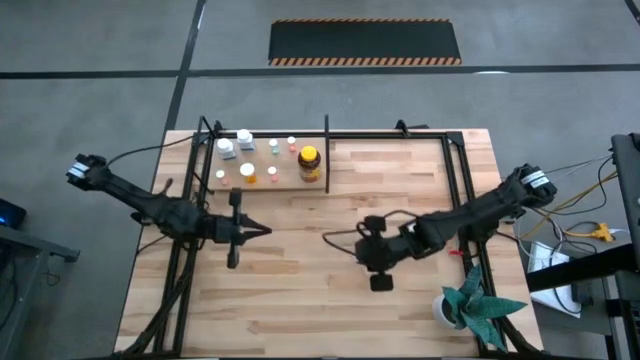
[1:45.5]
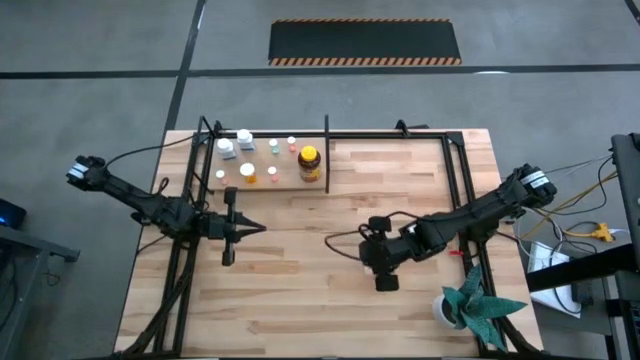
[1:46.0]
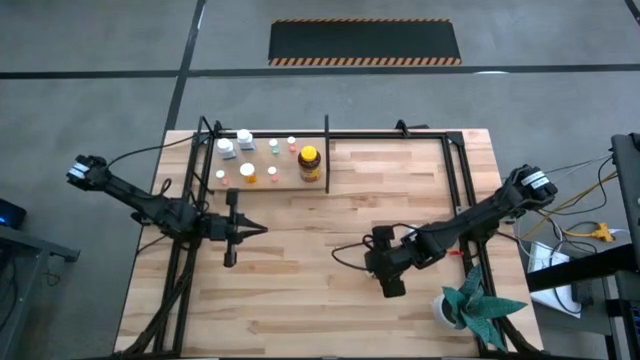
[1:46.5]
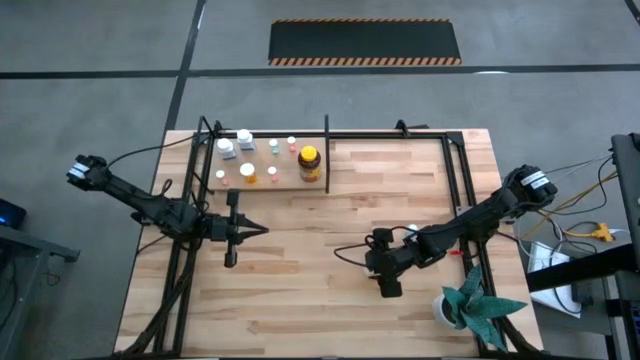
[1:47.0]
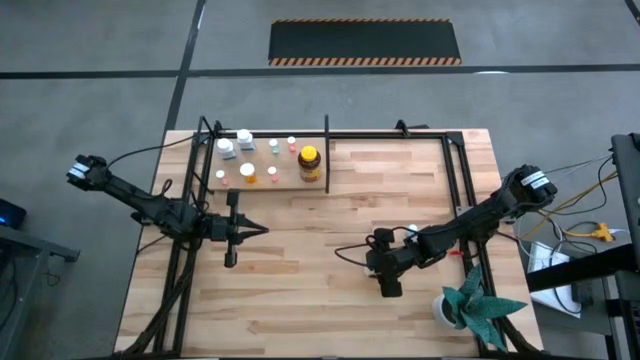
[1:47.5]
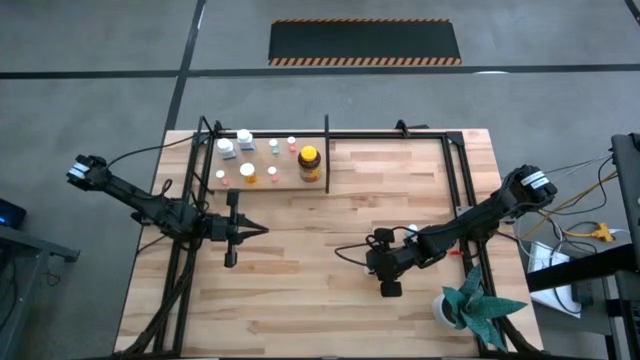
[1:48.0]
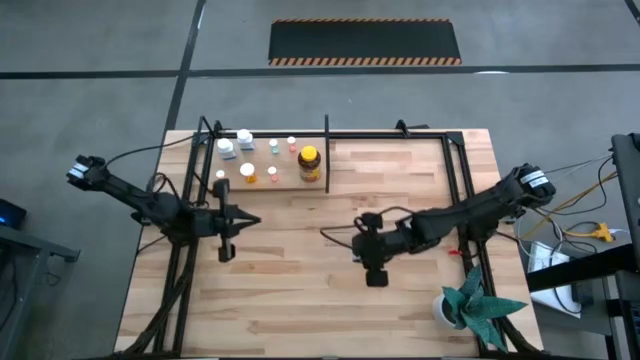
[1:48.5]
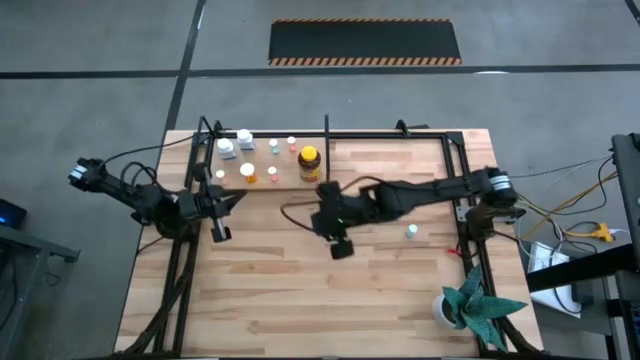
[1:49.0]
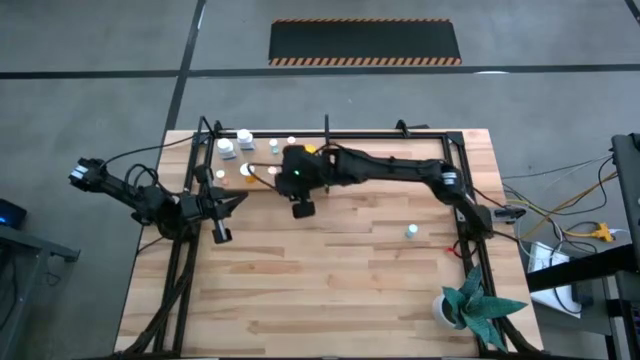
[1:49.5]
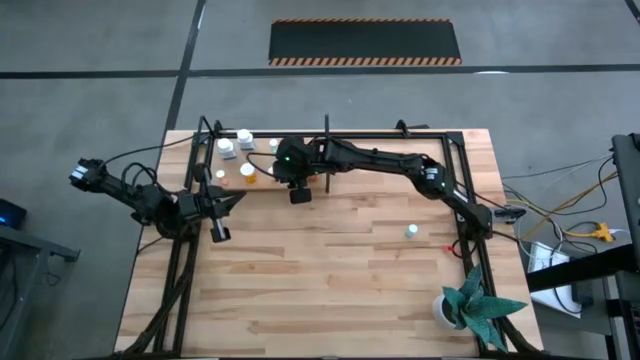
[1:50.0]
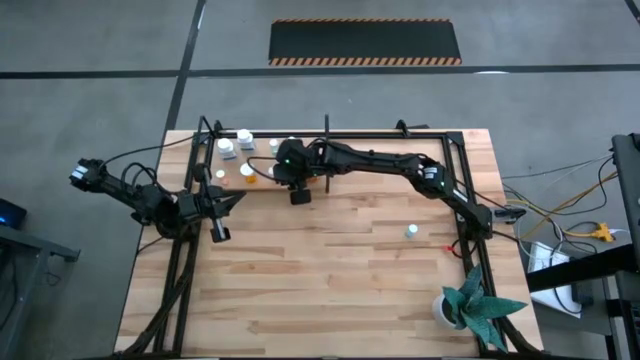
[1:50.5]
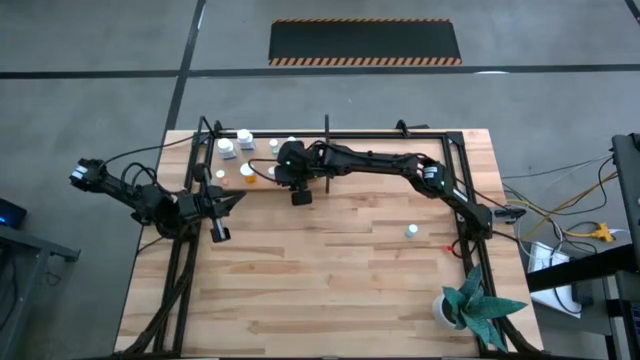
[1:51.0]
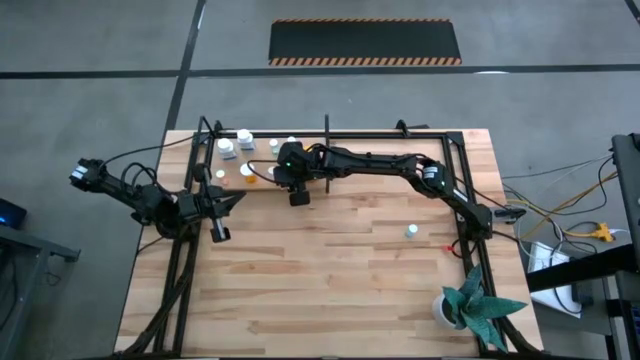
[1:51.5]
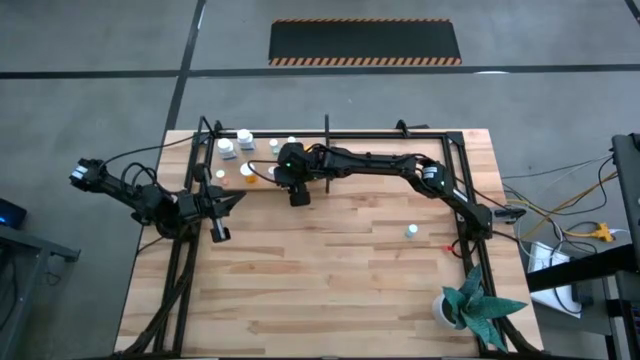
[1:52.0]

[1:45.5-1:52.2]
Task: Pick and place medicine bottles onto shelf by color
Put the transparent pill bottle on the shelf

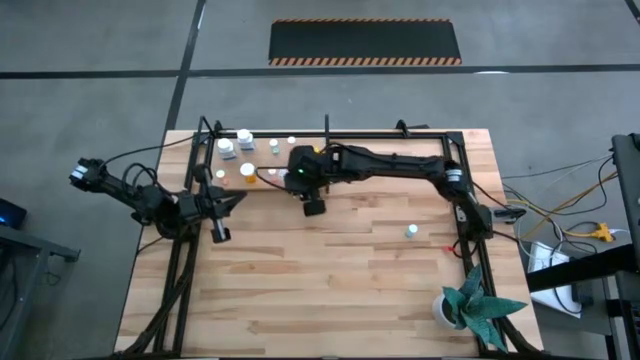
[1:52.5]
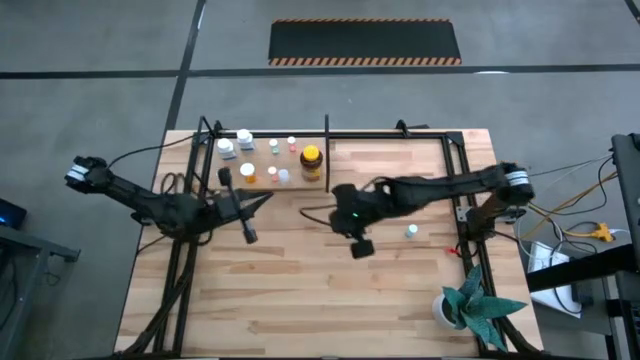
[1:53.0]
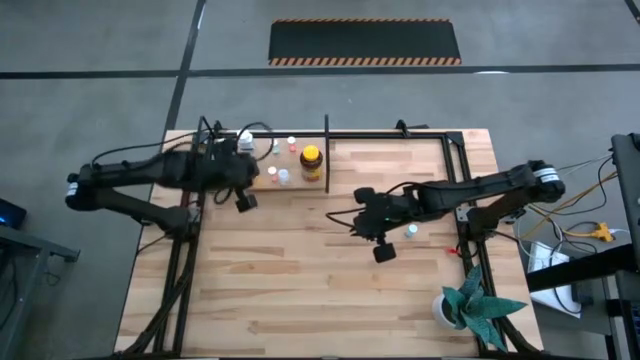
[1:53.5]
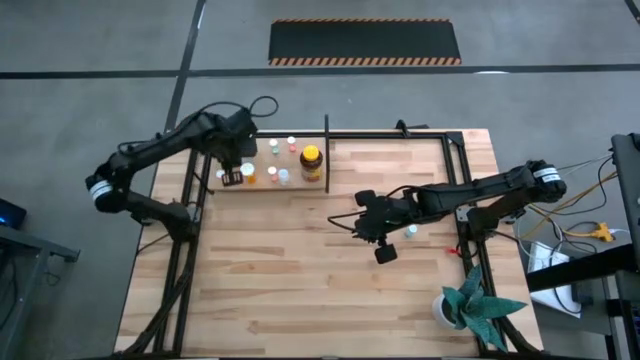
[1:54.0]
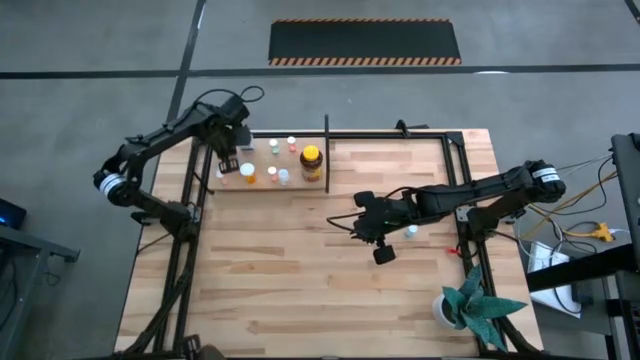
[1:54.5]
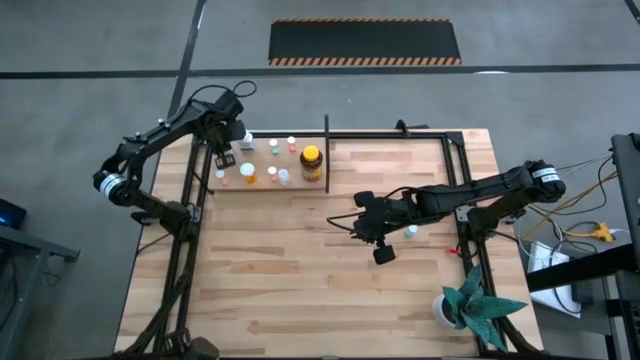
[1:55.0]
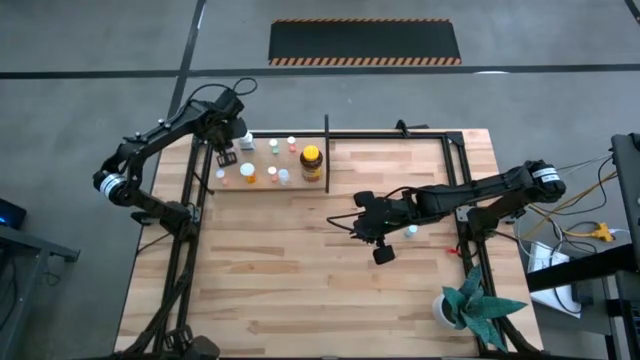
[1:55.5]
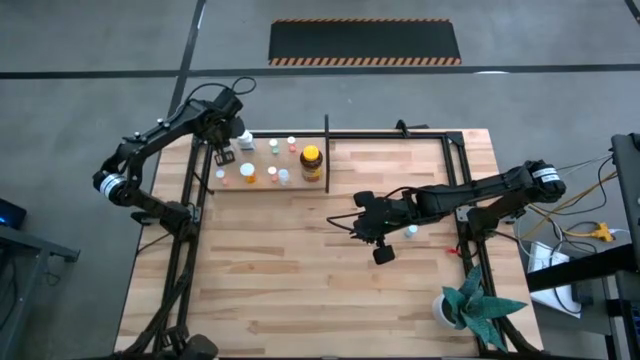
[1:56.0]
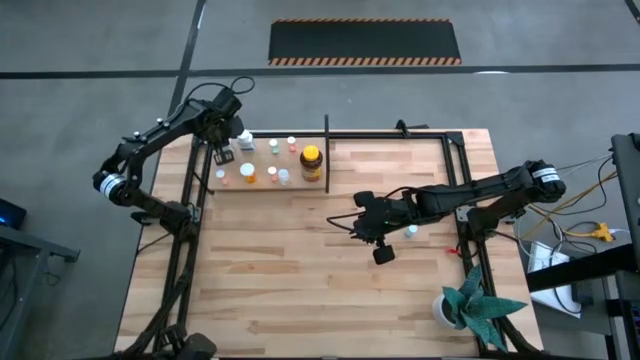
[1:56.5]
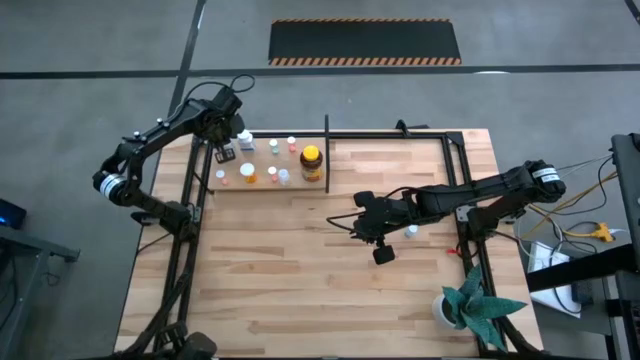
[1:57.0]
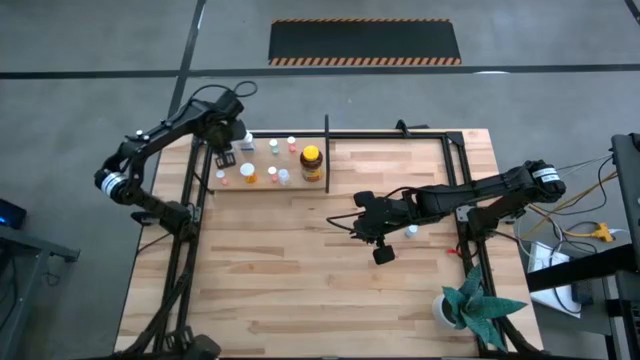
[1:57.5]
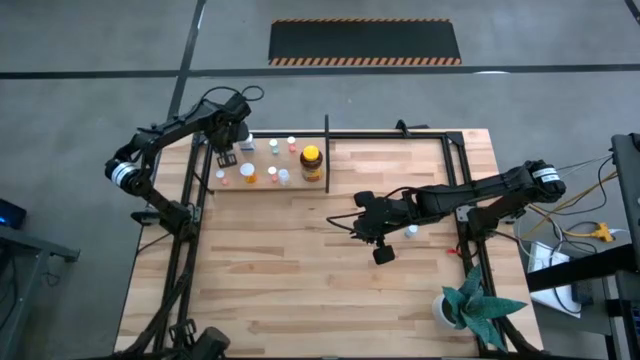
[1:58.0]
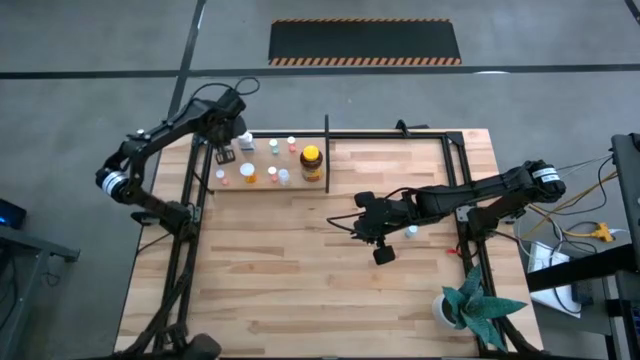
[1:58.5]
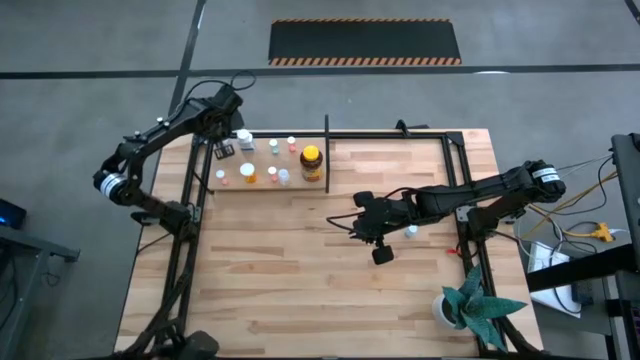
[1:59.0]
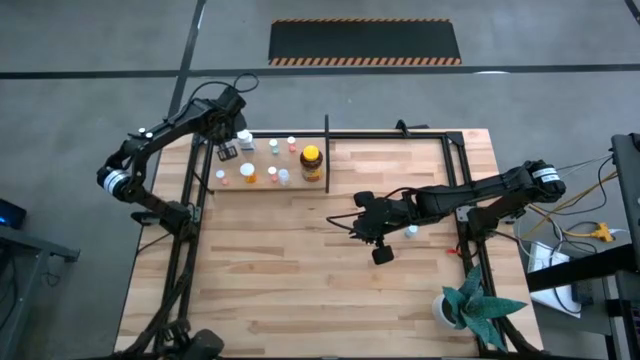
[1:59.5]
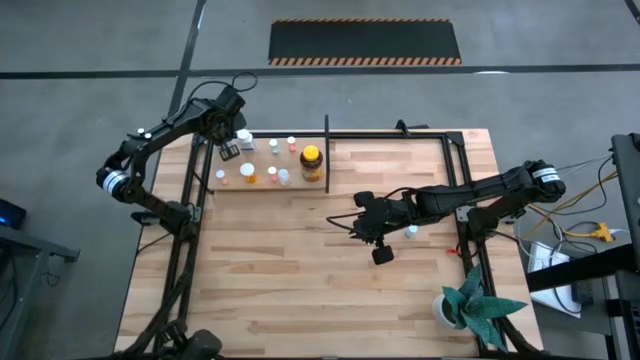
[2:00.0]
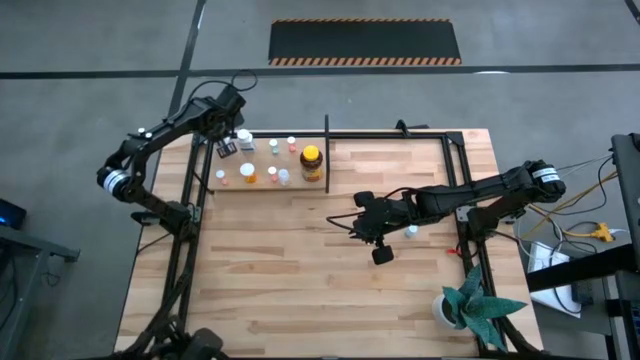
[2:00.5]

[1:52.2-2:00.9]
Adjust the white pill bottle on the shelf

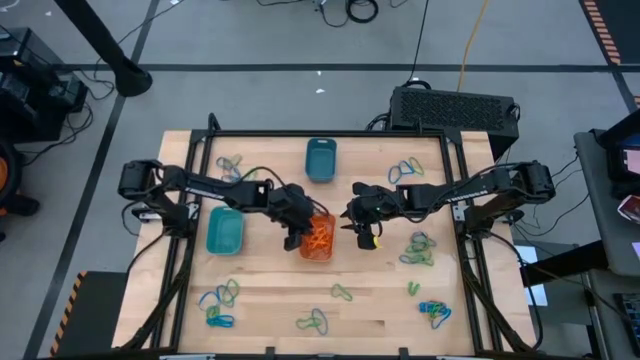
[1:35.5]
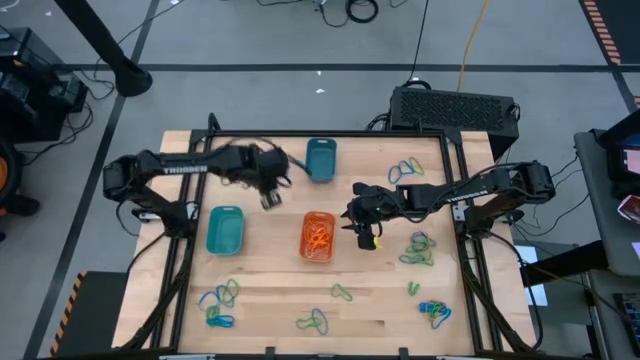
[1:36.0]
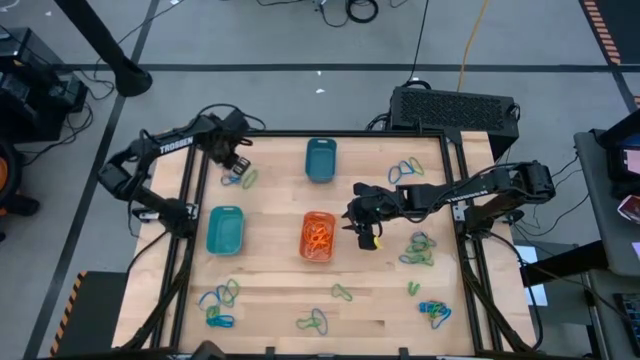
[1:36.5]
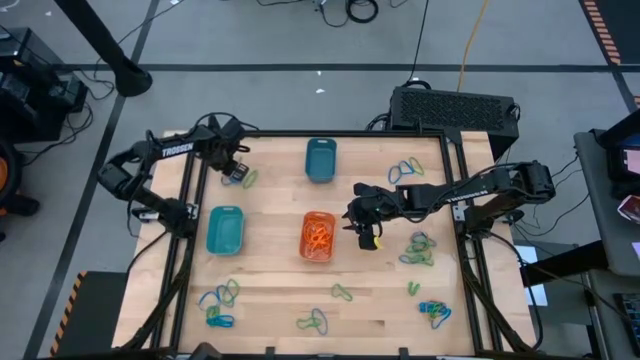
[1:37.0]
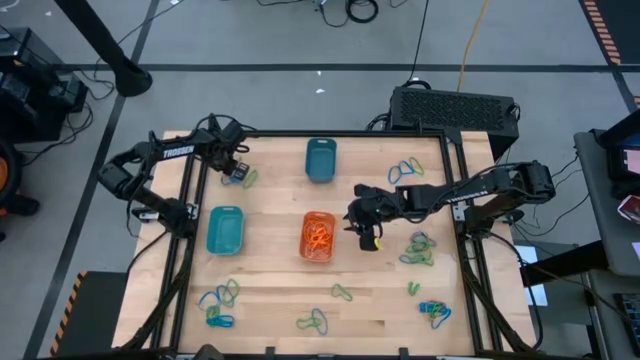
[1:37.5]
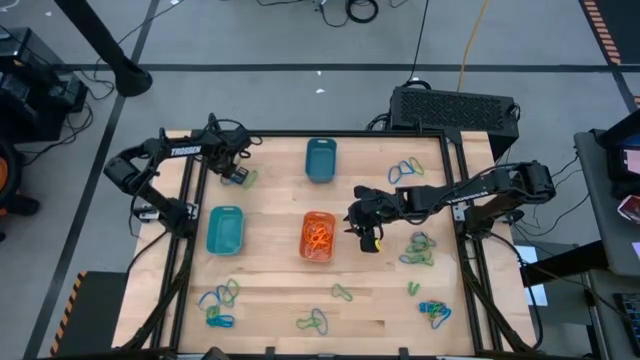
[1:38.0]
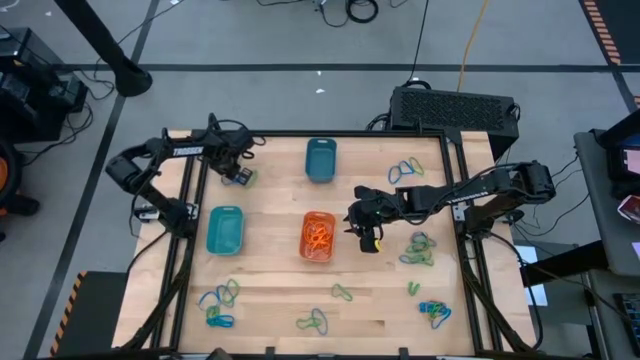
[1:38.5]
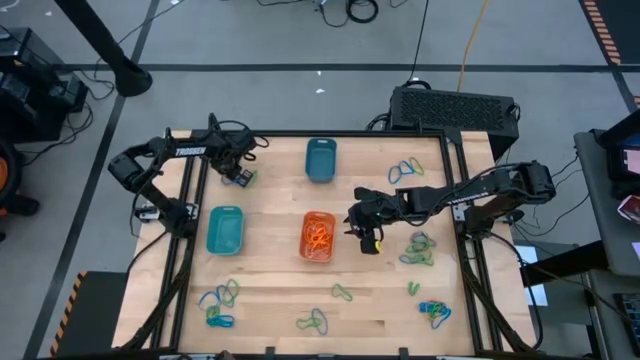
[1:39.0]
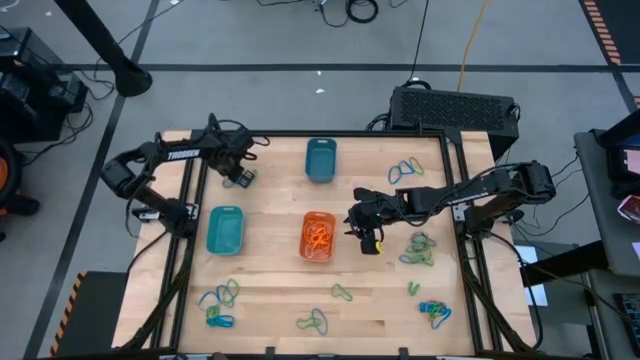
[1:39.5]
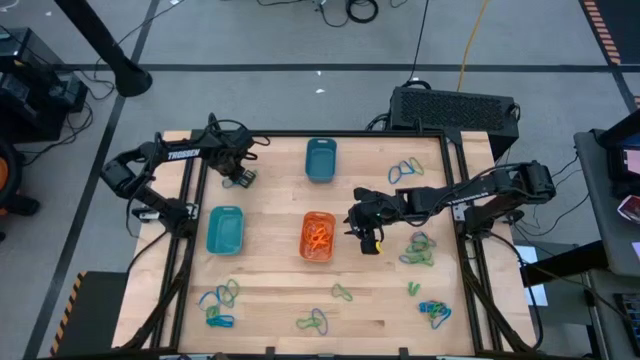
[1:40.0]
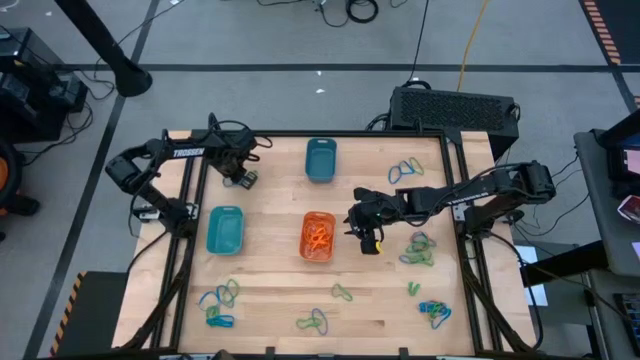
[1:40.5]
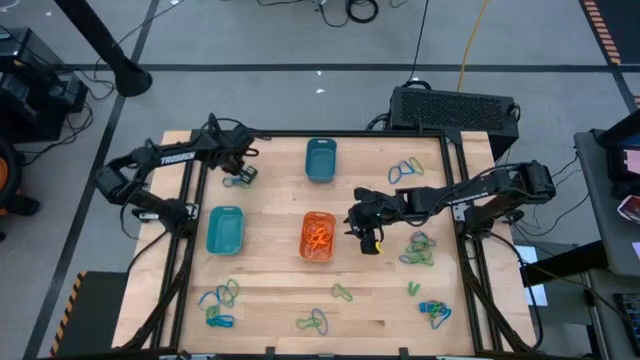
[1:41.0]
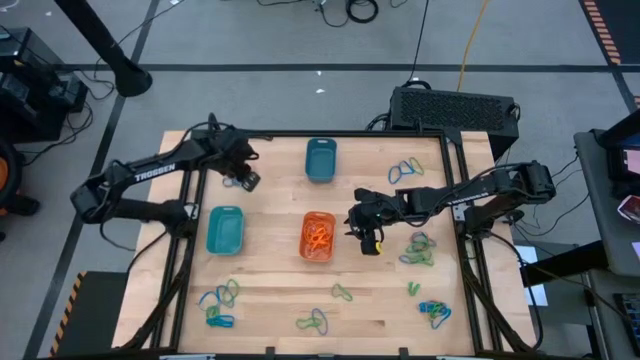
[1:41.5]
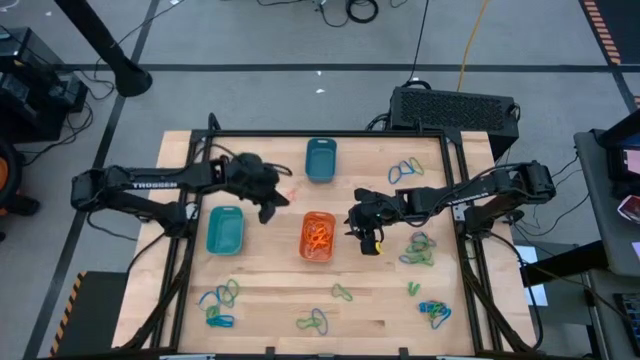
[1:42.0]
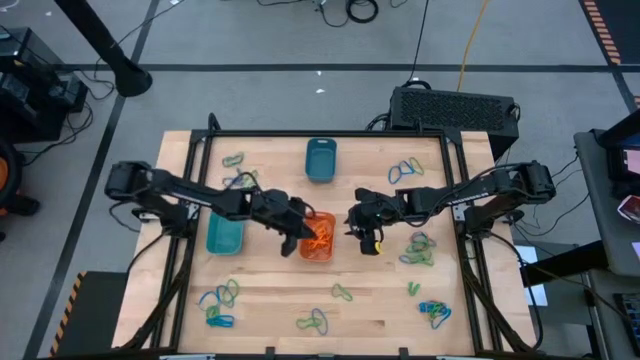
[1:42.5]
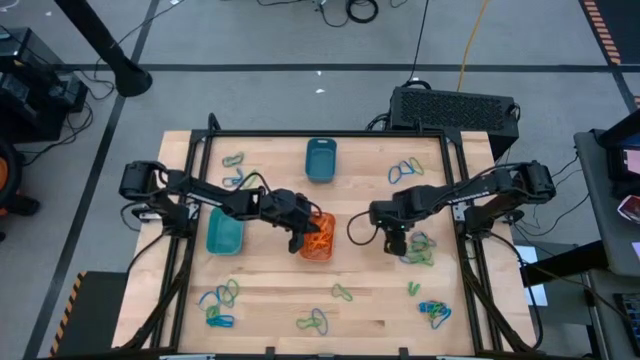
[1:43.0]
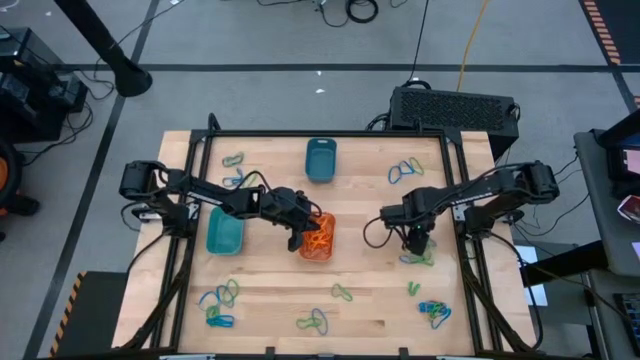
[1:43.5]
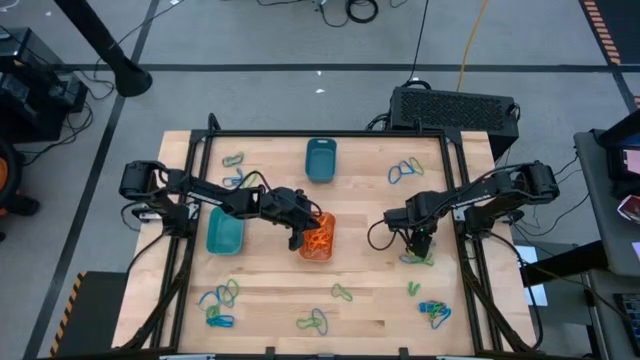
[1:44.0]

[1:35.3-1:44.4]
Task: Sort rubber bands into baskets
Put the orange rubber band into the orange bin
